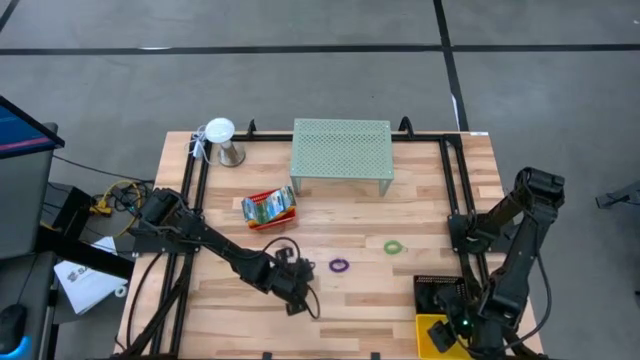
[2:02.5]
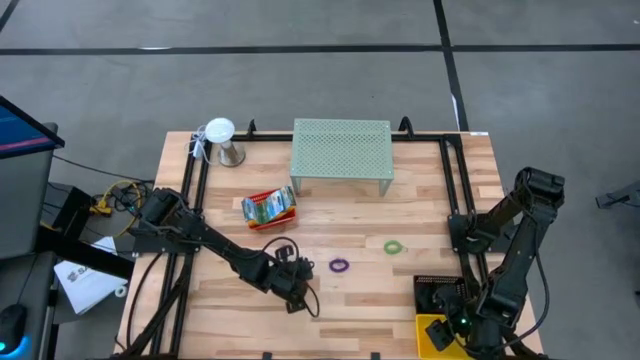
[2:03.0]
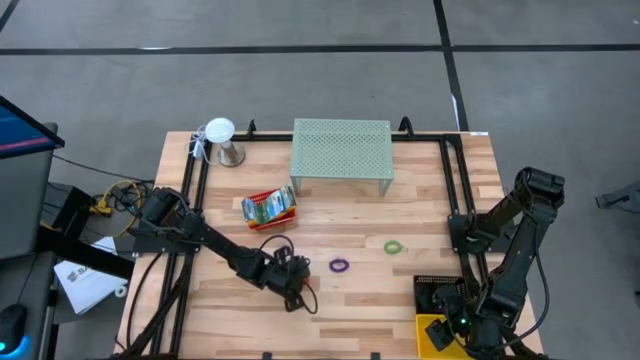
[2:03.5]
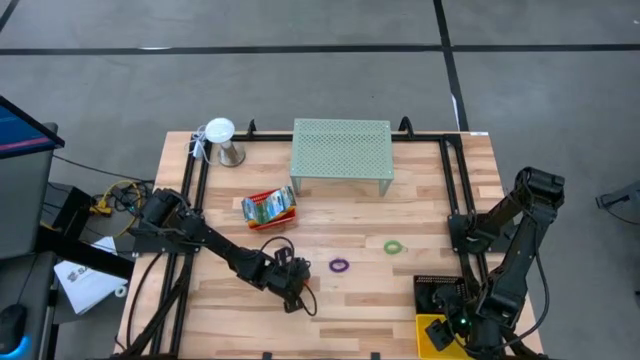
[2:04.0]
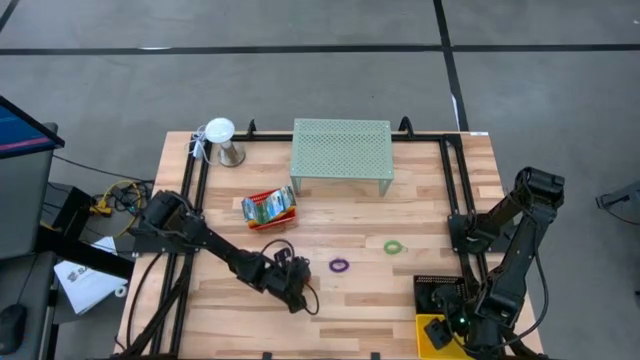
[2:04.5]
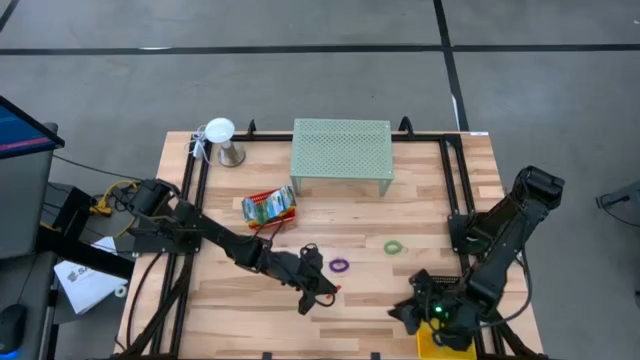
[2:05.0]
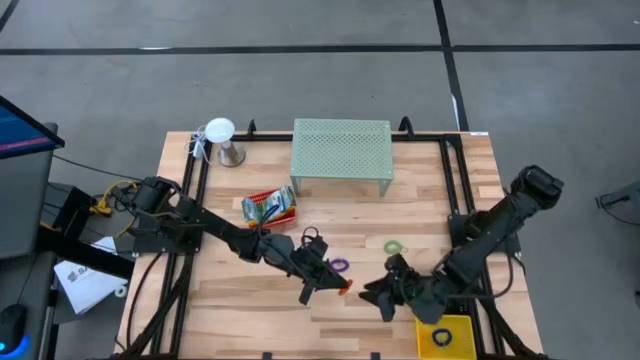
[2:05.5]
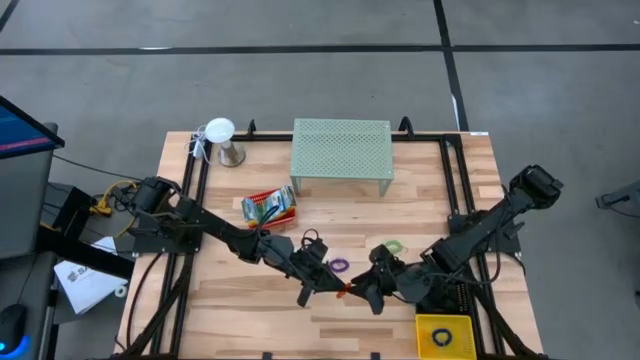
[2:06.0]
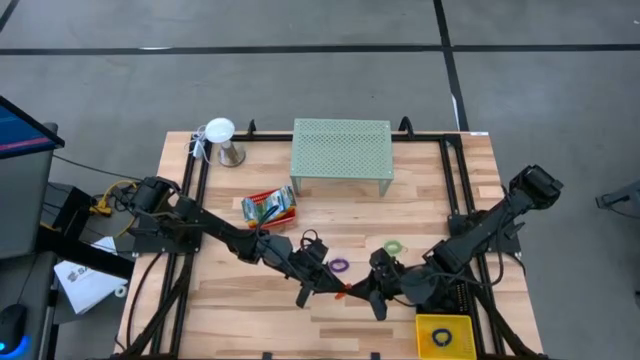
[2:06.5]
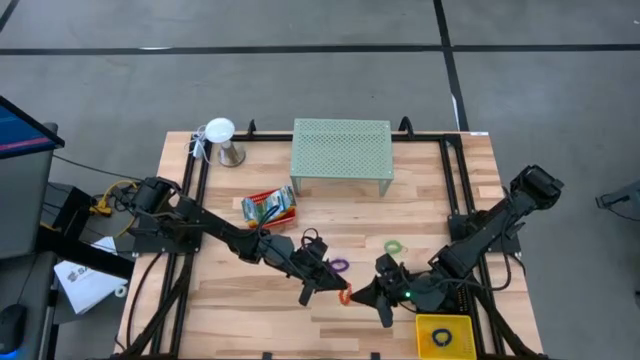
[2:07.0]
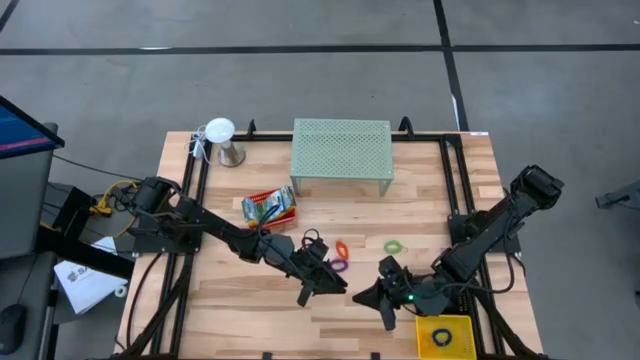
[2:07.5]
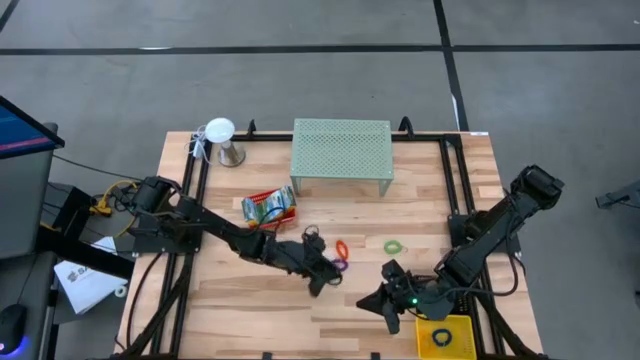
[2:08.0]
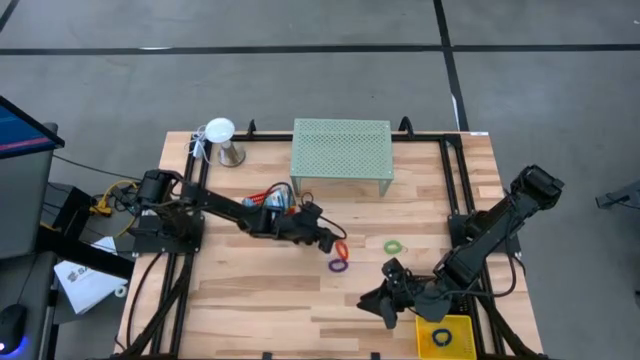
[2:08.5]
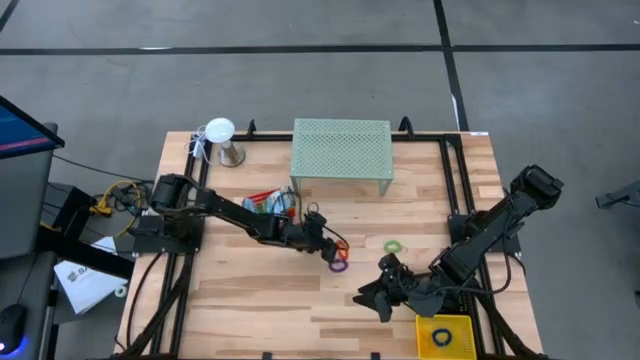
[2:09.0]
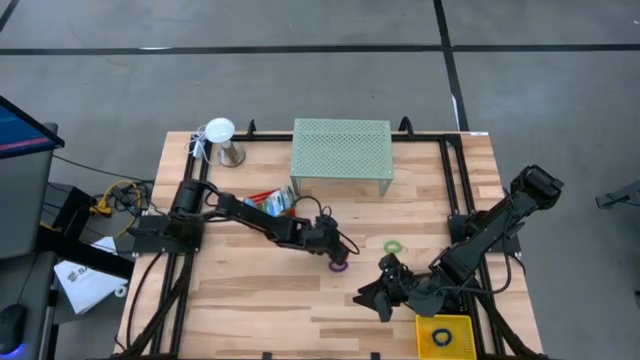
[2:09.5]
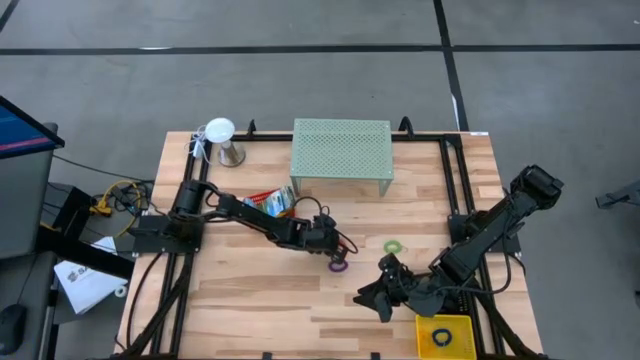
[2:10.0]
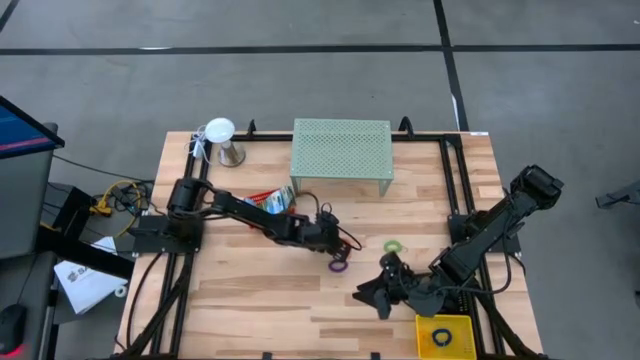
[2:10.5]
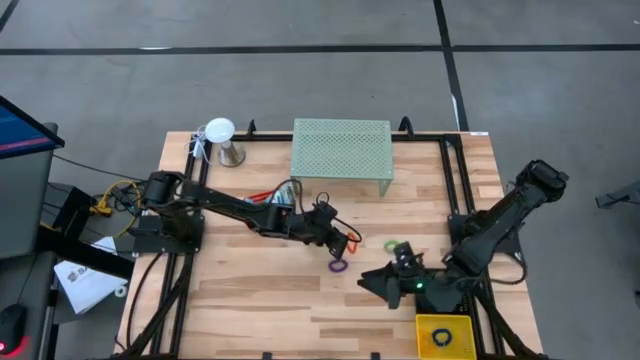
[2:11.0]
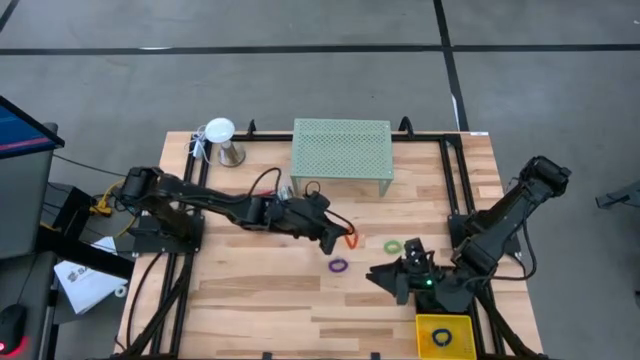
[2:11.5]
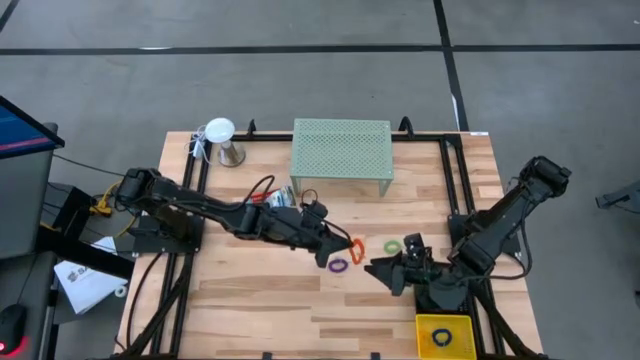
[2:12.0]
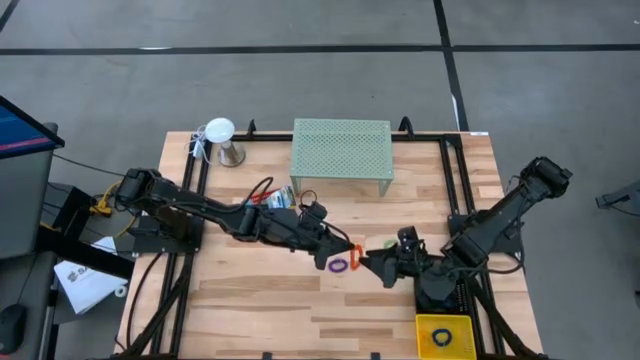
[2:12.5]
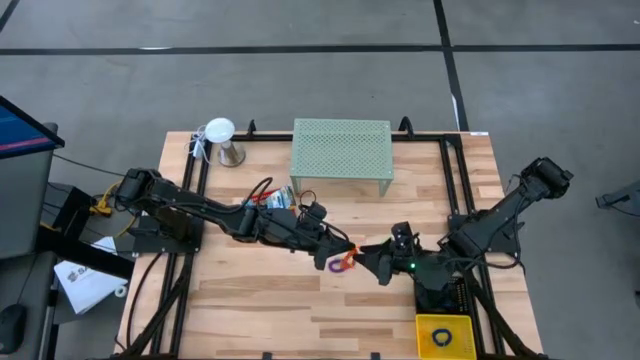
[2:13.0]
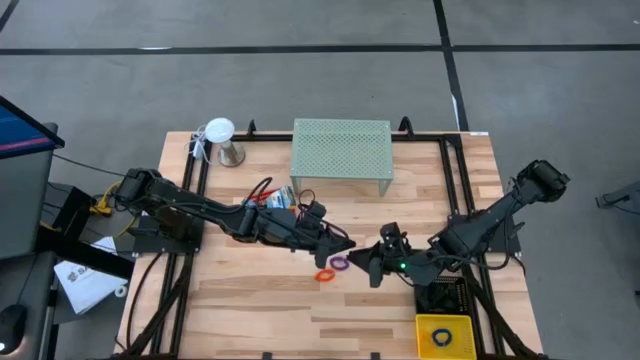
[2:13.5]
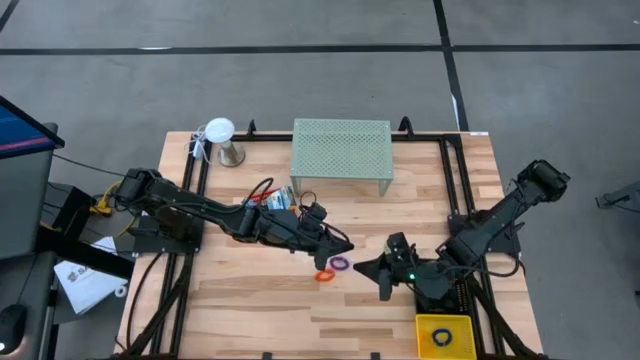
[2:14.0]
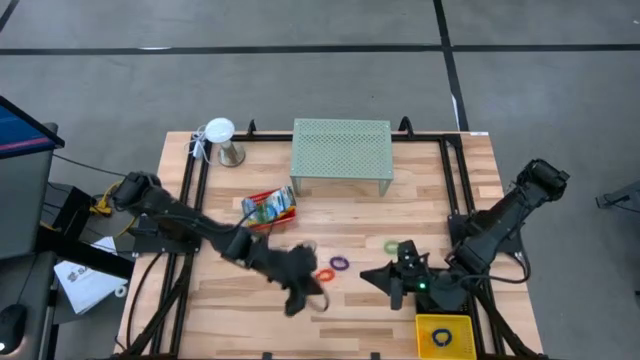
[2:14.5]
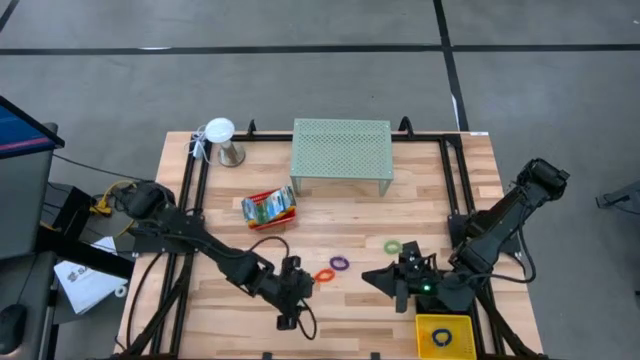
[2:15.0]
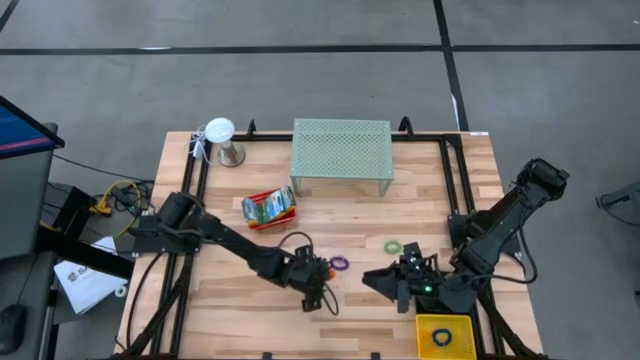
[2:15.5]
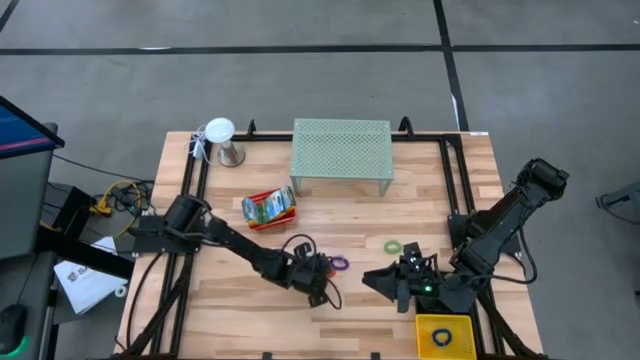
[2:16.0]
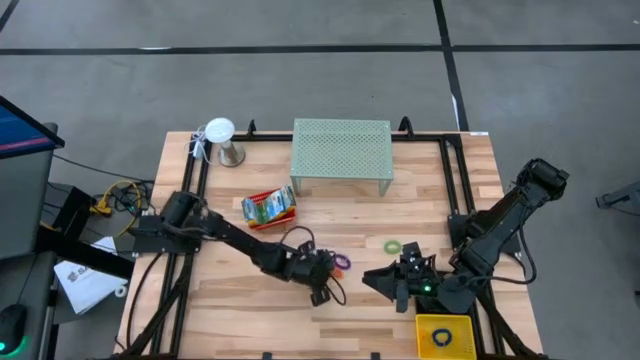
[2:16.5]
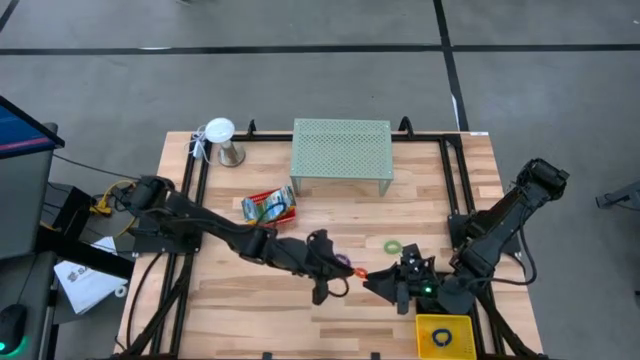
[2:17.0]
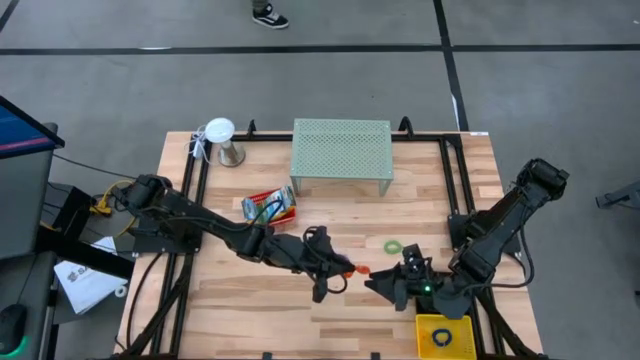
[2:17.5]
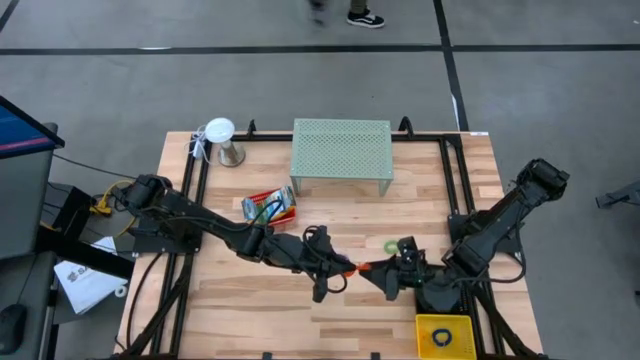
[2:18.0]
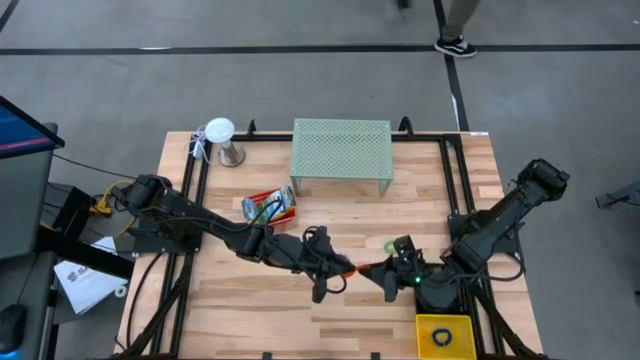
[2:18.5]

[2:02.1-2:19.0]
Task: Pick & Place Office Desk Supplies
Put the orange spring keychain into the yellow bin

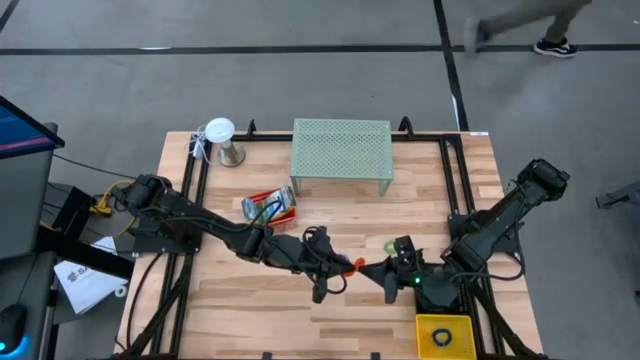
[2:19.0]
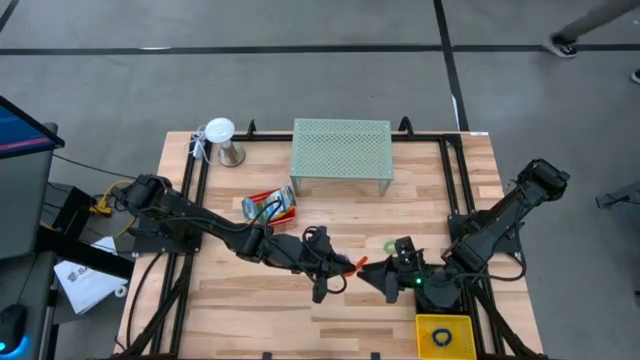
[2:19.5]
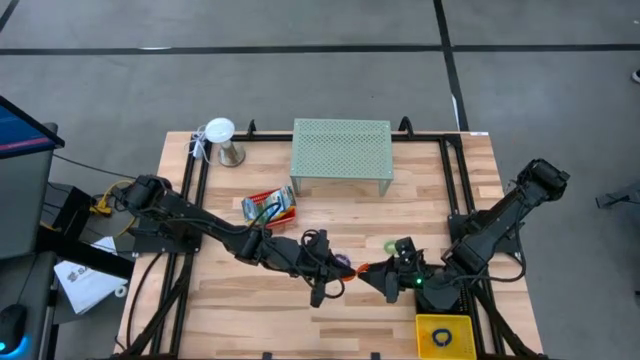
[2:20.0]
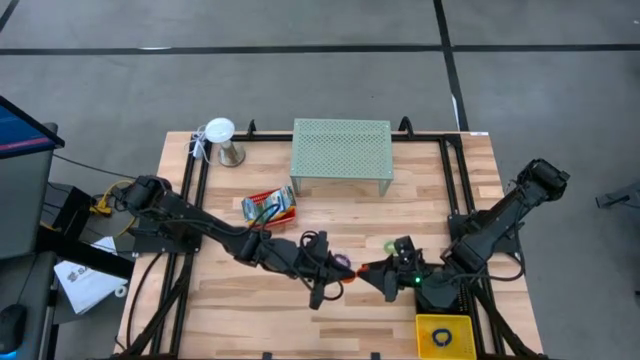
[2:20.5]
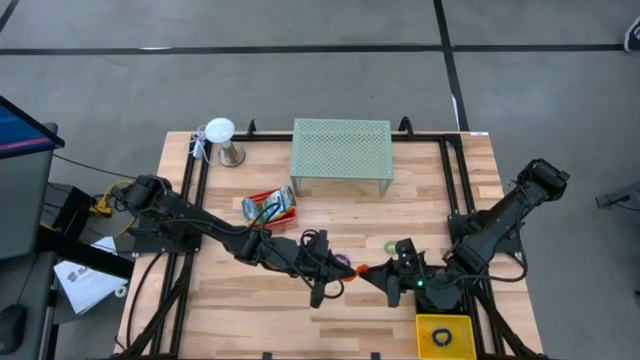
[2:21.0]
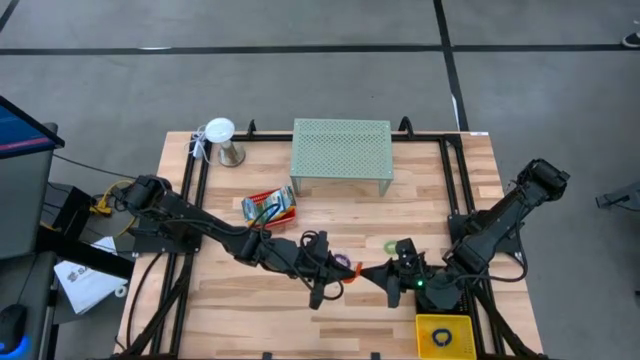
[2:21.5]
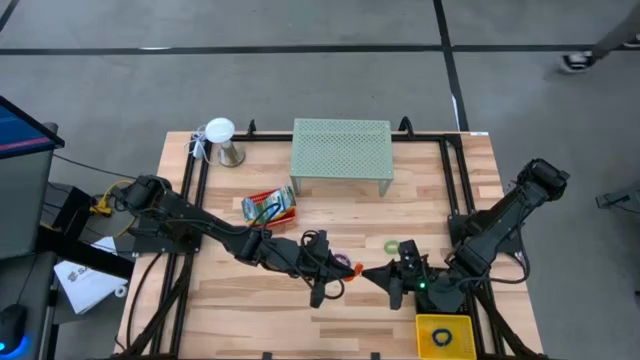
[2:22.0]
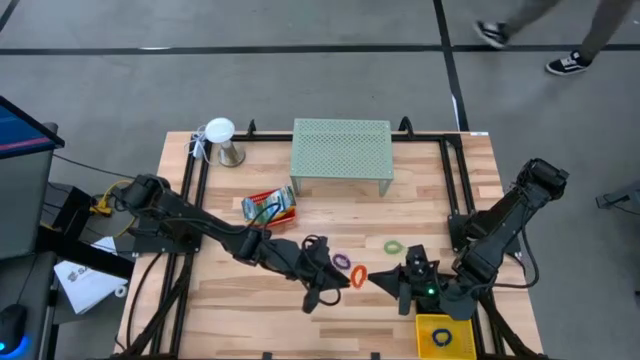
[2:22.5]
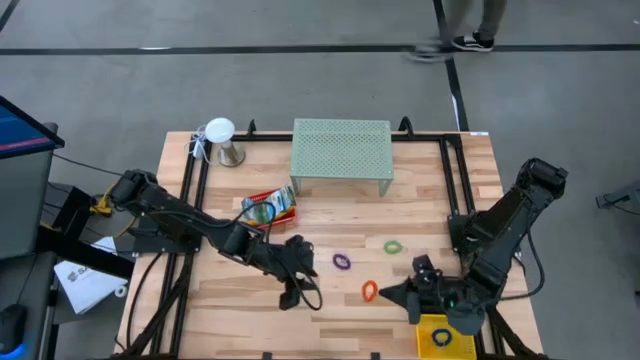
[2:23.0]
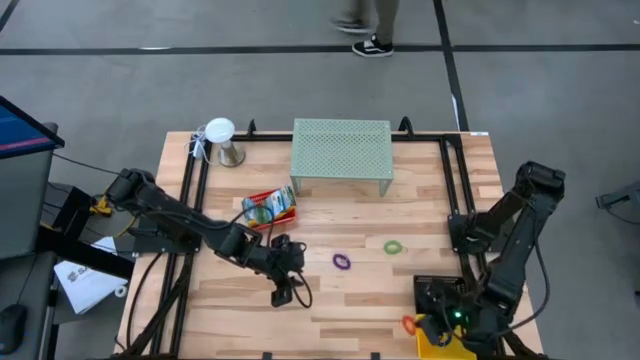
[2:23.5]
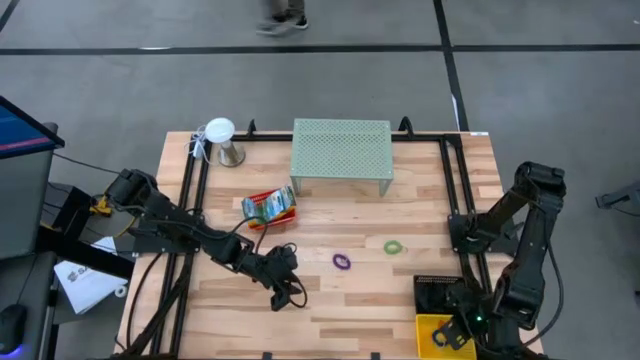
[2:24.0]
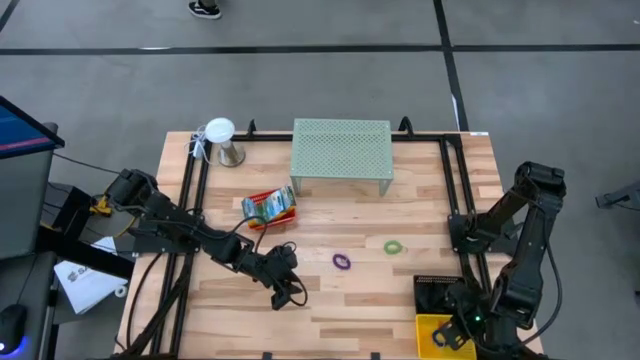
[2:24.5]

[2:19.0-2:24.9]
Put the orange spring keychain into the yellow bin
